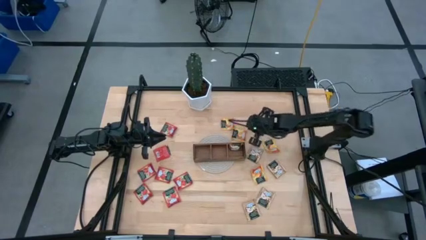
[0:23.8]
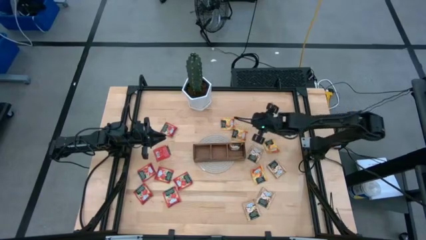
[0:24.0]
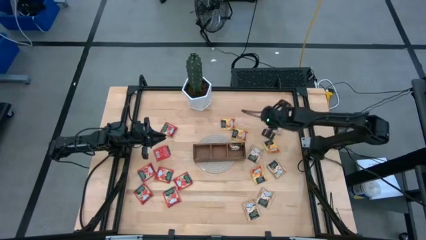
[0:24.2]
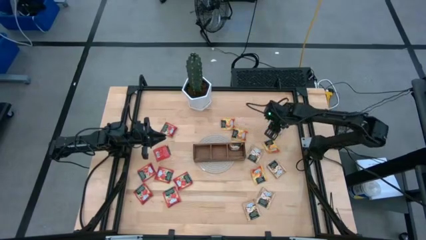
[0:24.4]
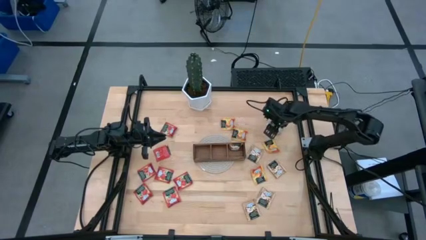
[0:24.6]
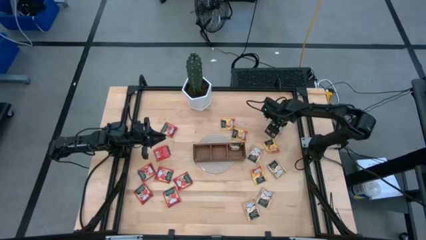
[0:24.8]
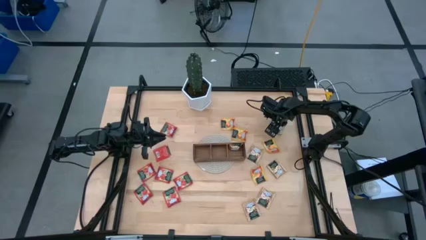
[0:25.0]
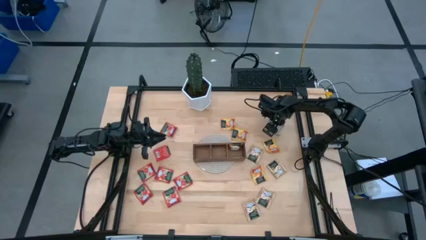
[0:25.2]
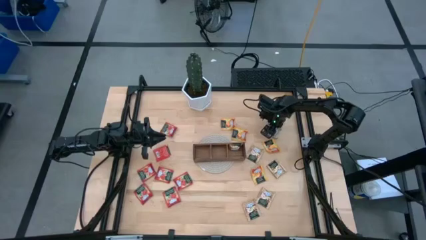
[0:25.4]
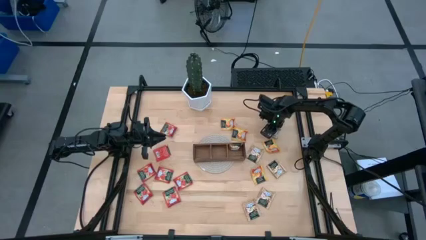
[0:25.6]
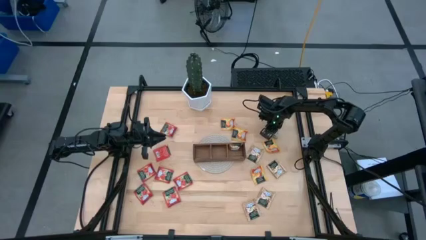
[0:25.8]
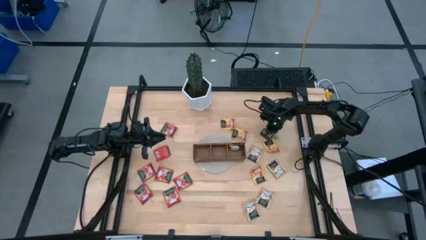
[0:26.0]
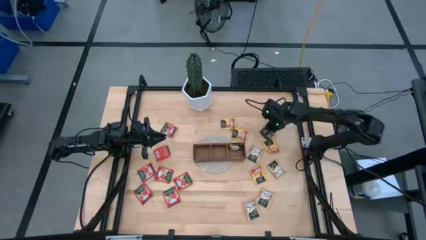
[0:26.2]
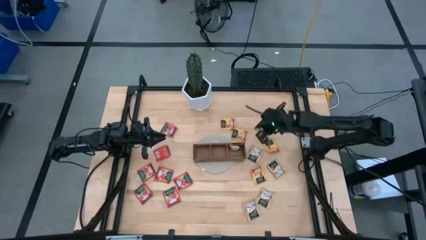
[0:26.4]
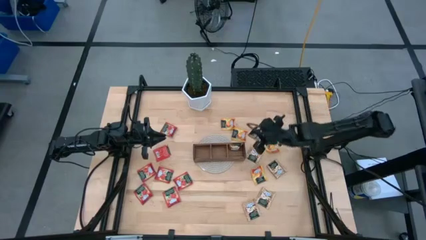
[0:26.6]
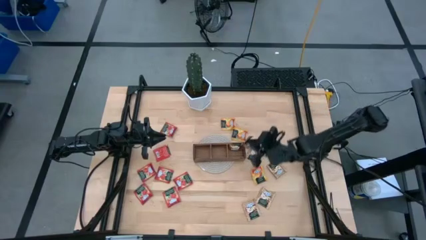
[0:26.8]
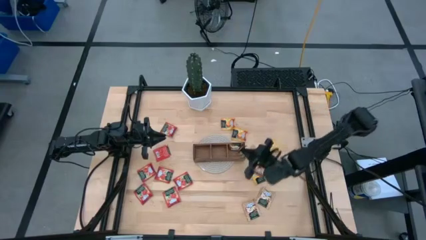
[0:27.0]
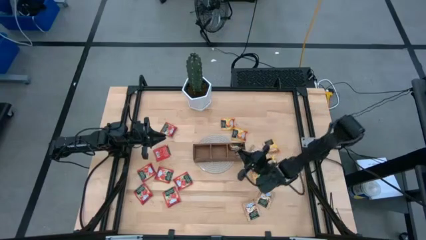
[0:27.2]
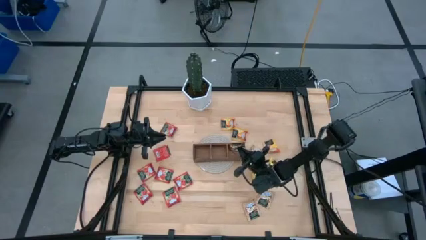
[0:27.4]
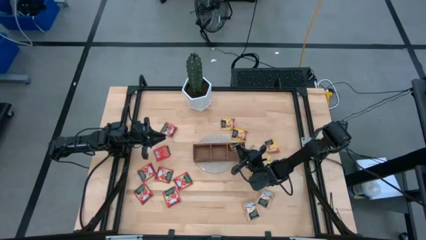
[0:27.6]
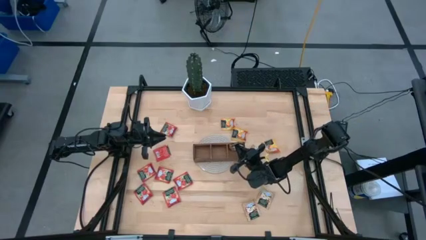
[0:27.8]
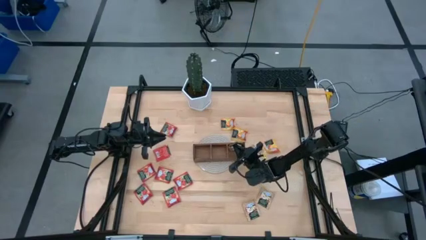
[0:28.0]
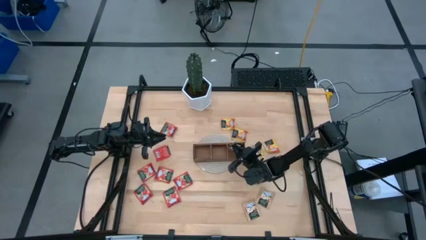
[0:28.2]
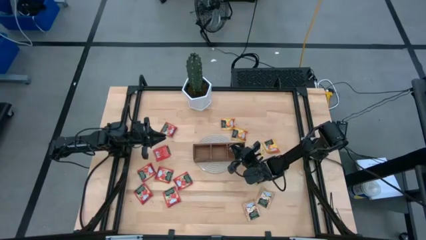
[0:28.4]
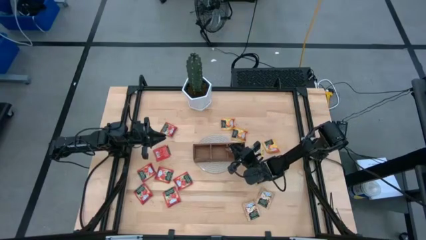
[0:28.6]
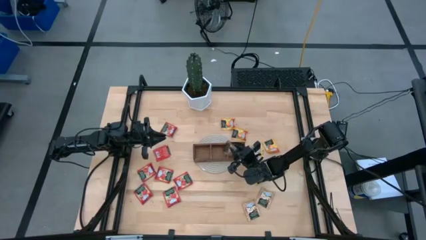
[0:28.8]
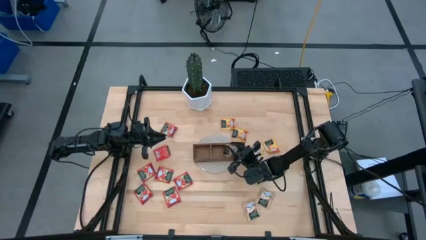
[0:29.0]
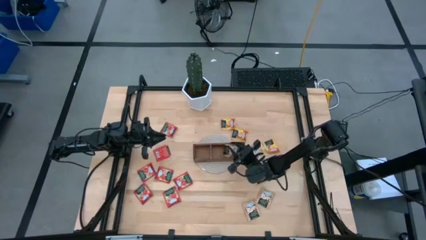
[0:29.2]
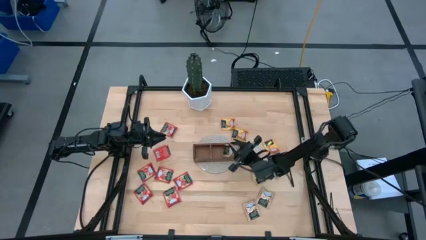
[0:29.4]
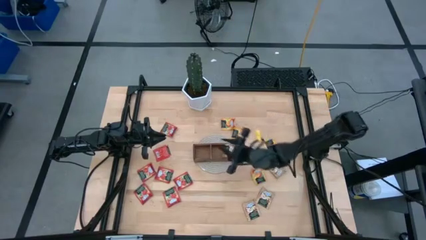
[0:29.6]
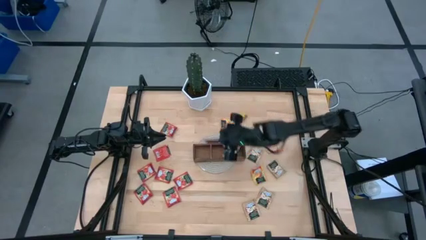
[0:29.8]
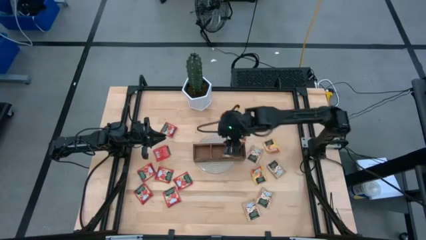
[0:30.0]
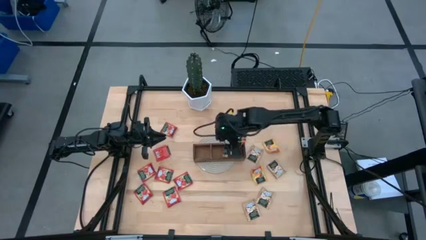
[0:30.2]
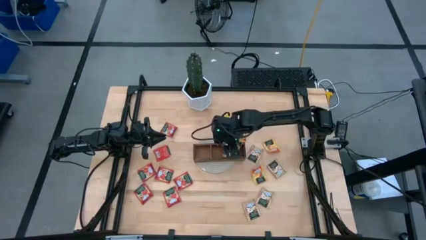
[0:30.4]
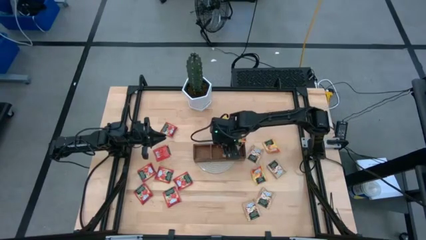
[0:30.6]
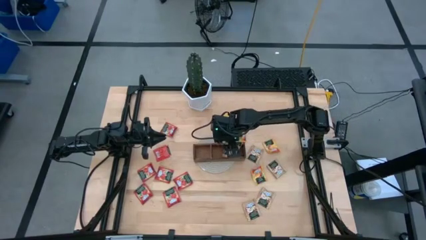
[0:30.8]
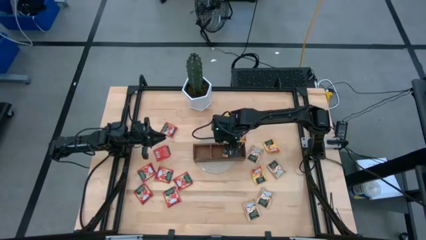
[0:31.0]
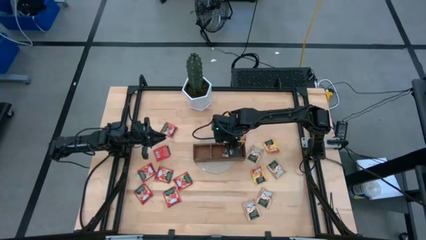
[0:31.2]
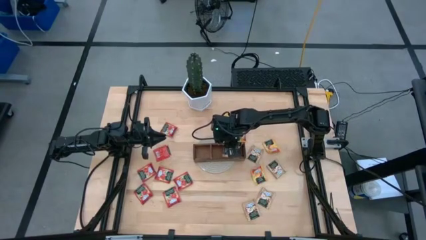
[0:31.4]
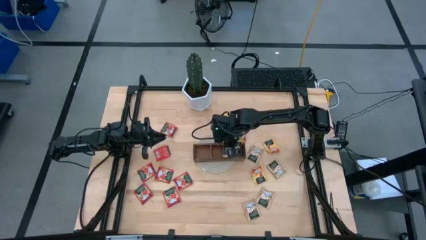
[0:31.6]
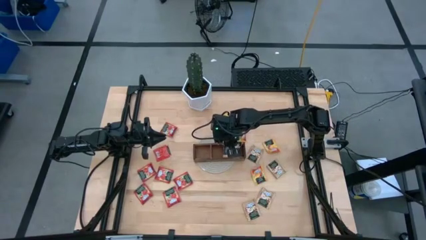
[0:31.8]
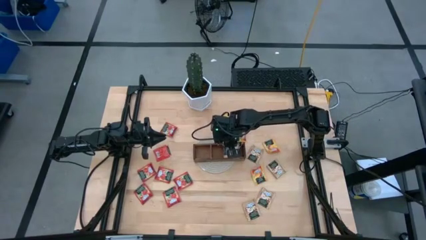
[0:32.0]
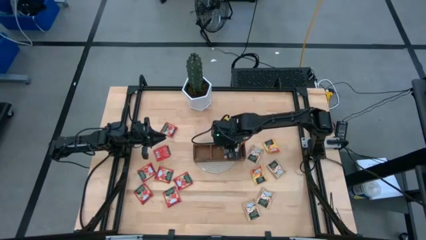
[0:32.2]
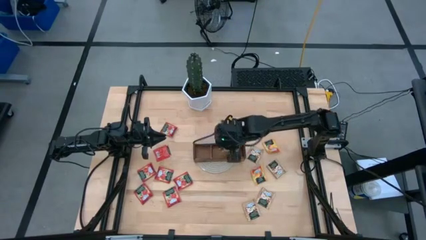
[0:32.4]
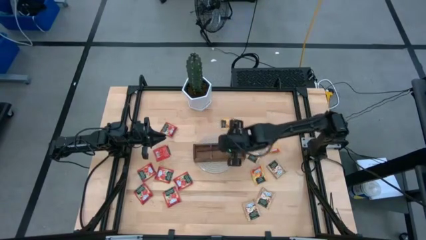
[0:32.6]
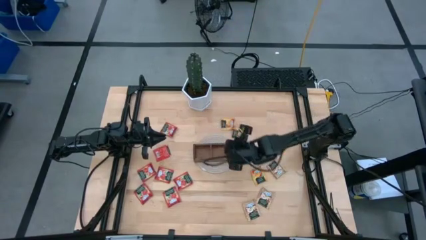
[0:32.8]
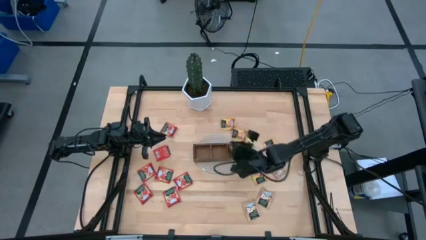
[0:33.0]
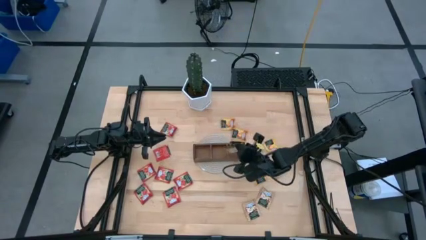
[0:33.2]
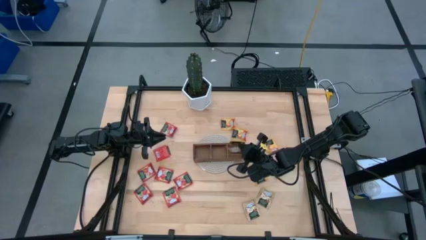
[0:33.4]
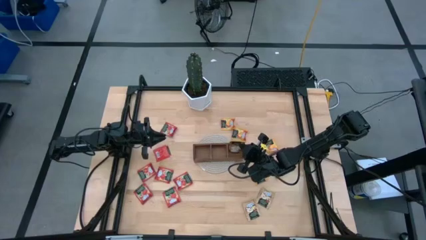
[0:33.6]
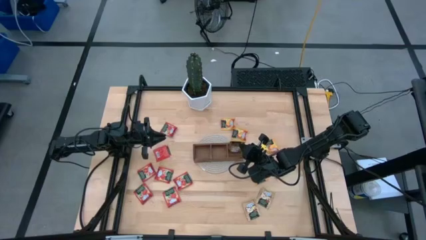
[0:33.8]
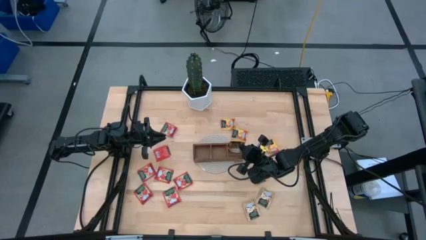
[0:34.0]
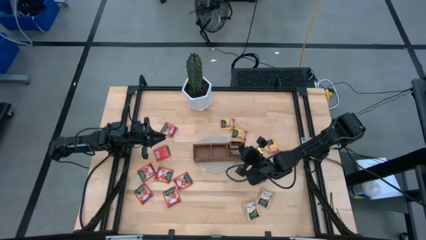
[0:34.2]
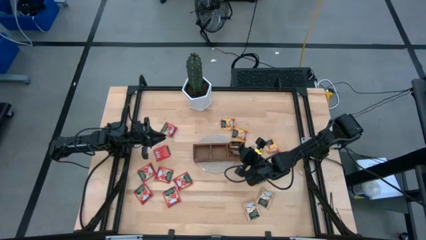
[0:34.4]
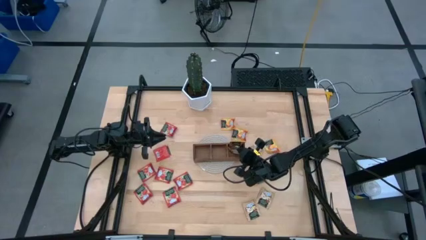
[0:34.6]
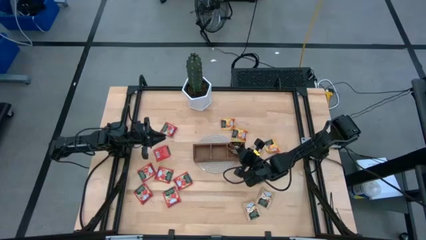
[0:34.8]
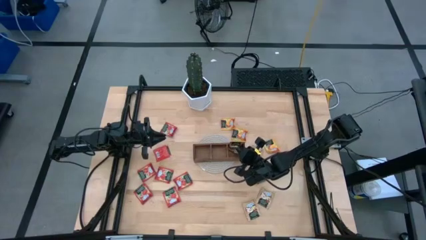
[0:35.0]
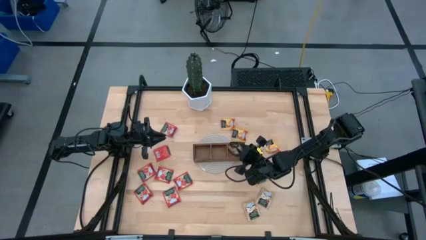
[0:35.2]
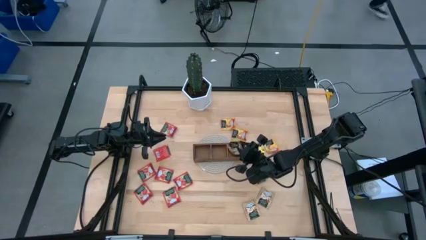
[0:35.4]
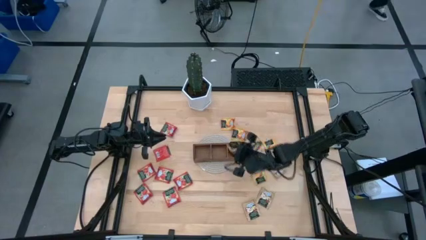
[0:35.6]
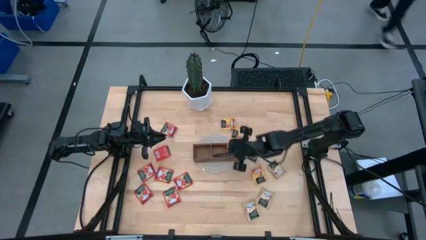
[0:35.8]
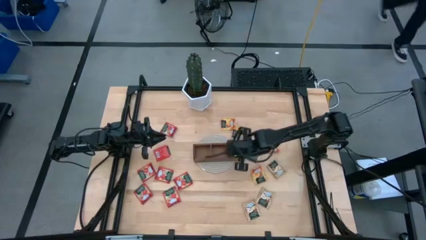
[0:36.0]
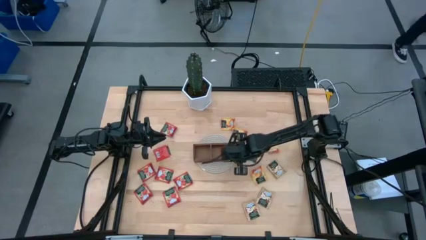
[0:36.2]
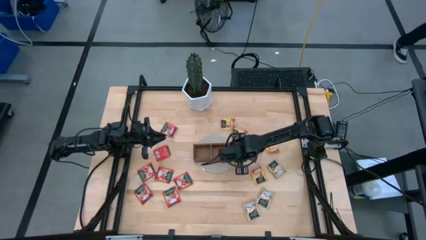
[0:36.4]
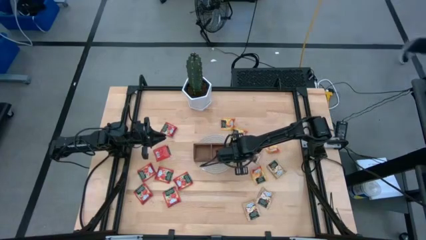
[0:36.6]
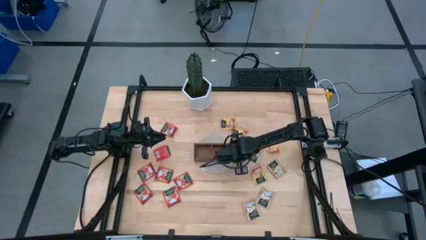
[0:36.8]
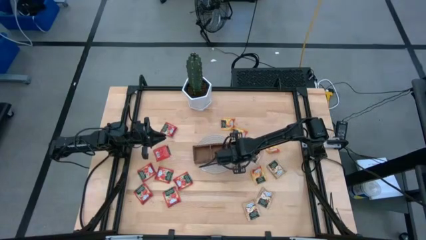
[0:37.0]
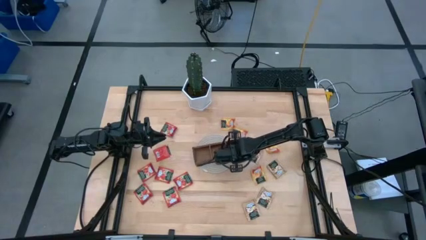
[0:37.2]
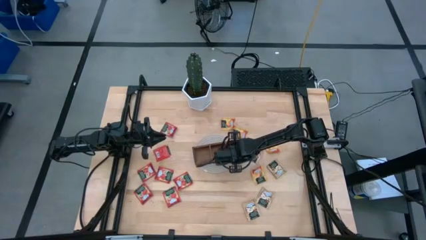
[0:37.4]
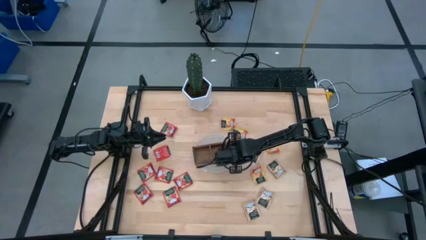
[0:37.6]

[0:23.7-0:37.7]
Task: Pick & Place Tea
Put the brown tea bag into the right section of the wooden organizer

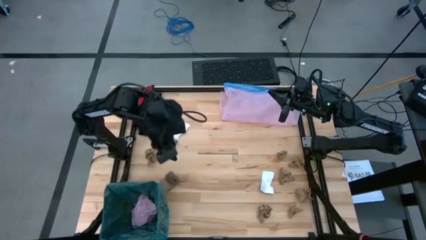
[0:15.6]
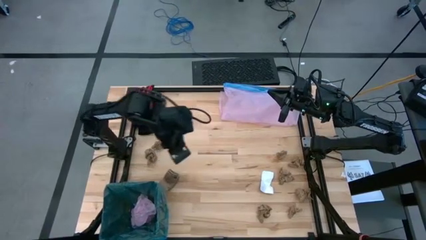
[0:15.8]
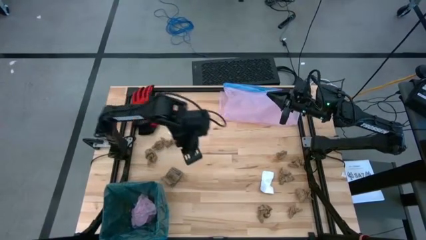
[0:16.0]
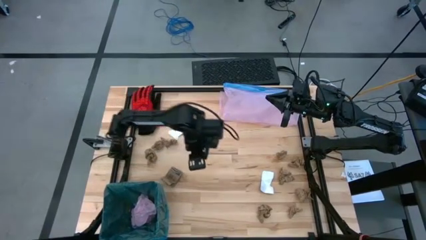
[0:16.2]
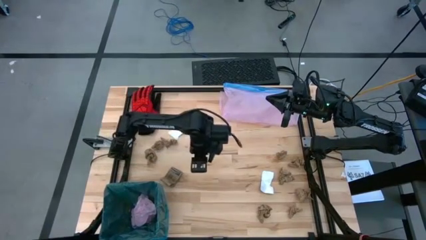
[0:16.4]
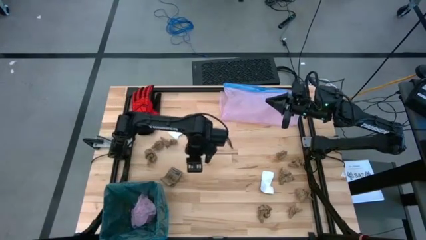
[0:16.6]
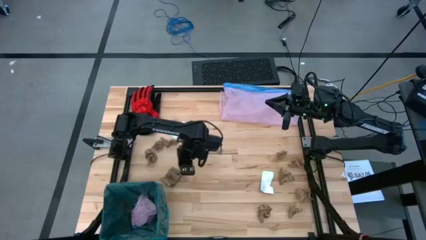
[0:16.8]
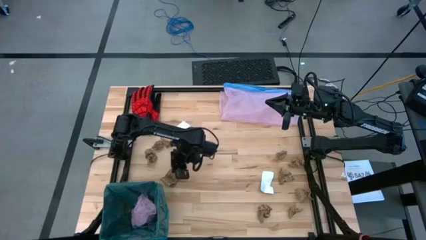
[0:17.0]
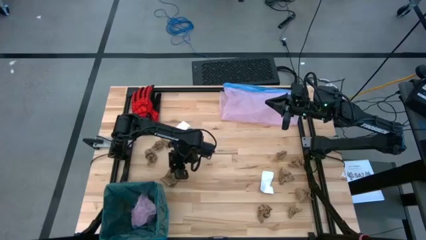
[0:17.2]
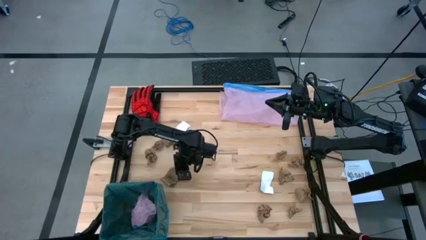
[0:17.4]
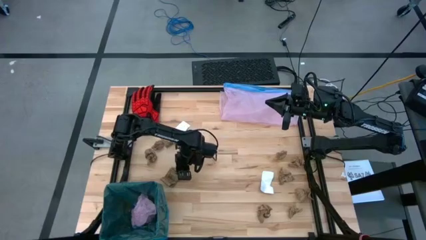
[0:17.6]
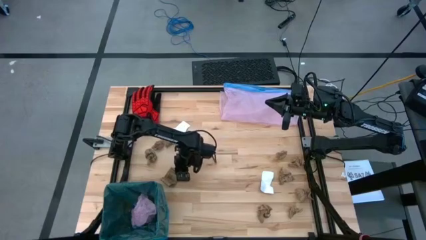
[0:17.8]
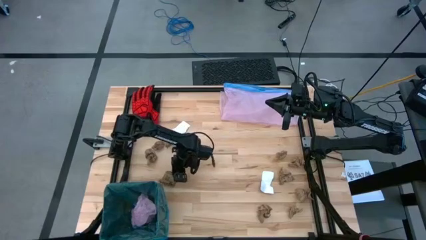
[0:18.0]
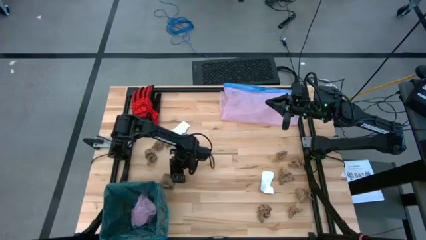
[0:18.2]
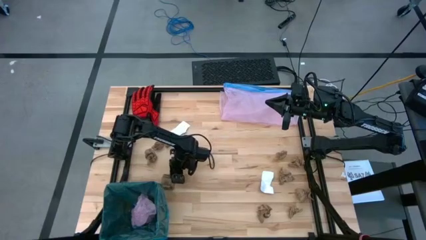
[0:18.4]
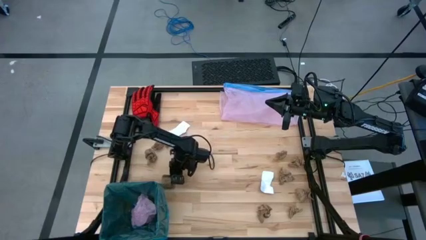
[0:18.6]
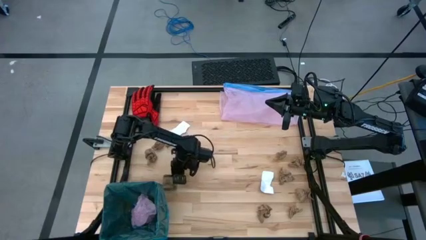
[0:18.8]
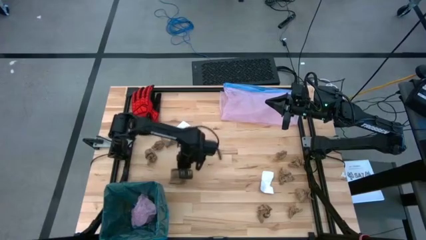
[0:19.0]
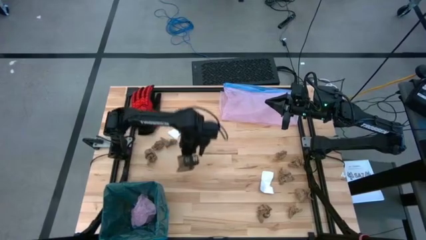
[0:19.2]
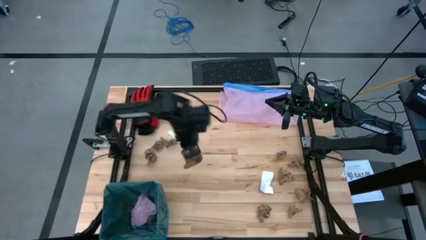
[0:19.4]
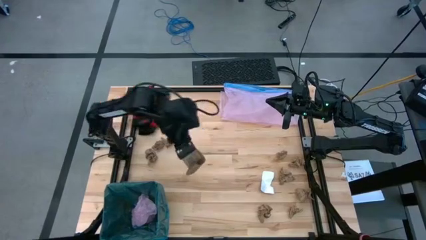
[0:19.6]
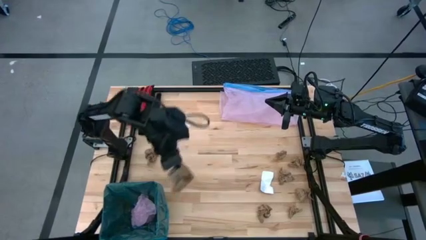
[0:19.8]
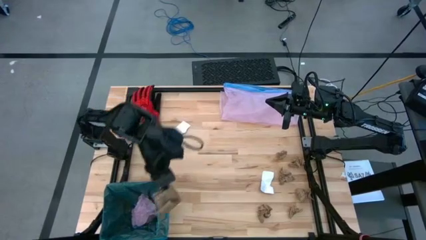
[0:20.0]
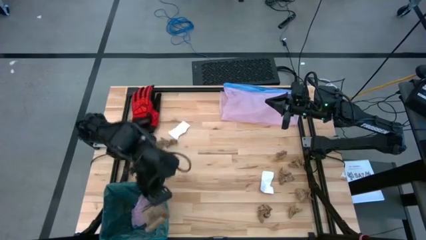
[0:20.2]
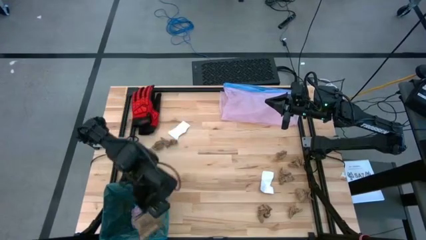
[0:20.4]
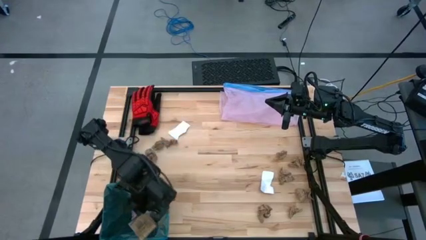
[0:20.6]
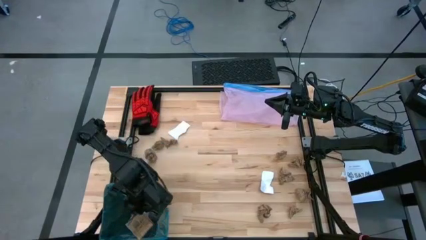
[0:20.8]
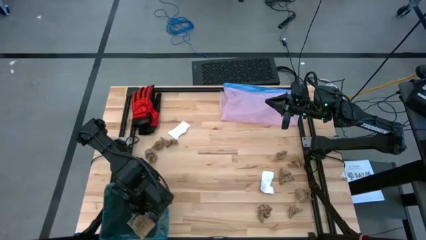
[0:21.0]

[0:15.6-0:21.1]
Task: place trash/remove bag and relplace
Put the cardboard coffee sleeve into the black trash bin
